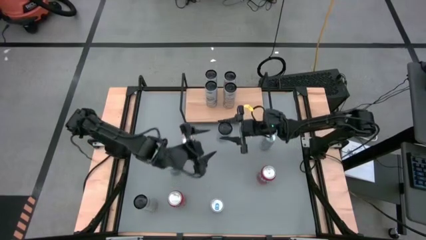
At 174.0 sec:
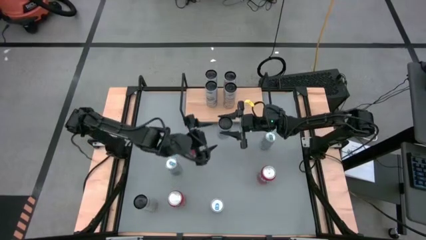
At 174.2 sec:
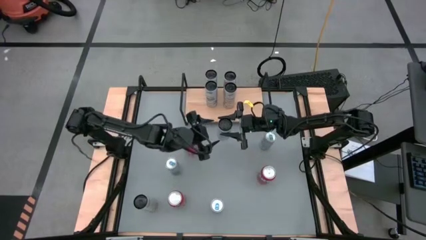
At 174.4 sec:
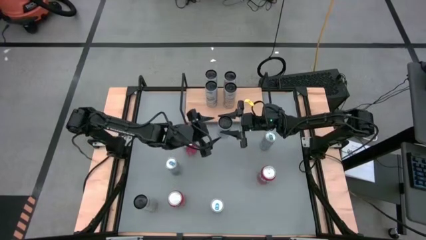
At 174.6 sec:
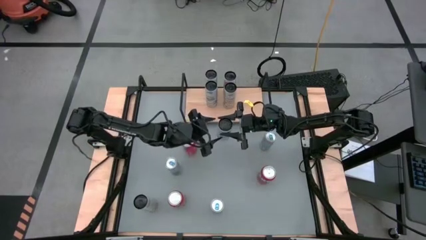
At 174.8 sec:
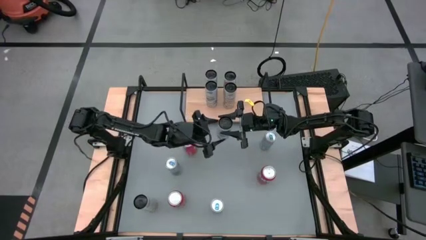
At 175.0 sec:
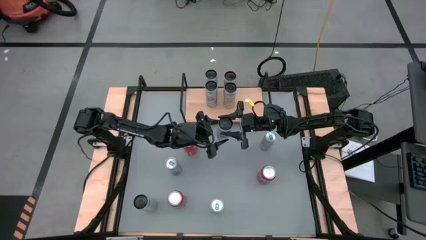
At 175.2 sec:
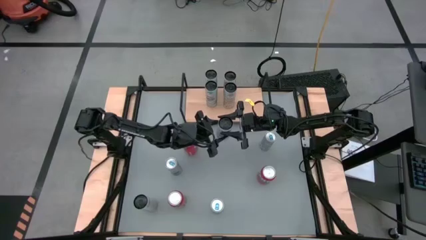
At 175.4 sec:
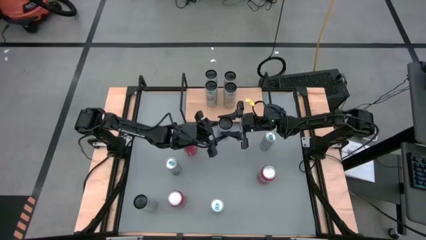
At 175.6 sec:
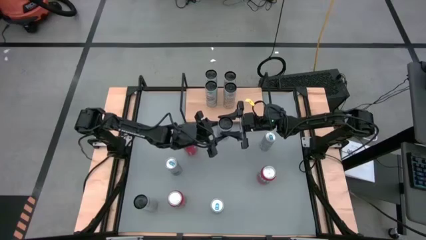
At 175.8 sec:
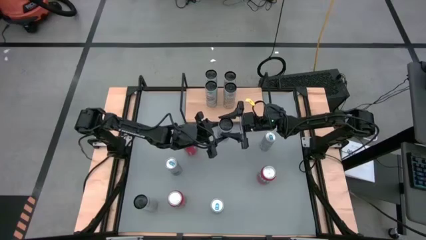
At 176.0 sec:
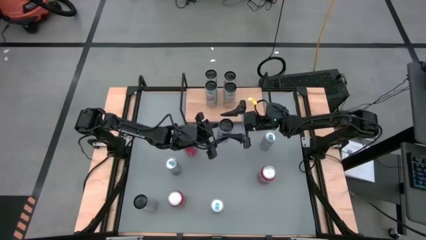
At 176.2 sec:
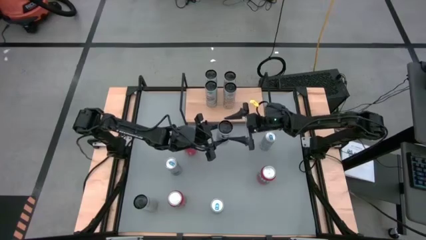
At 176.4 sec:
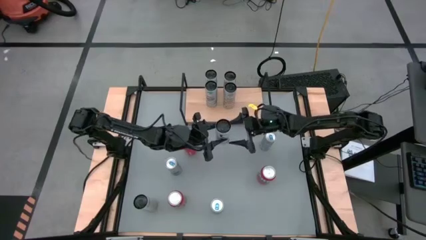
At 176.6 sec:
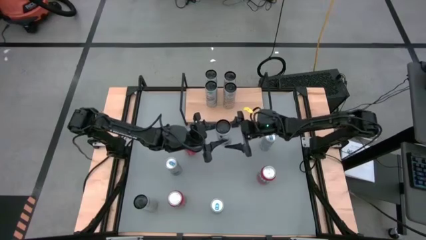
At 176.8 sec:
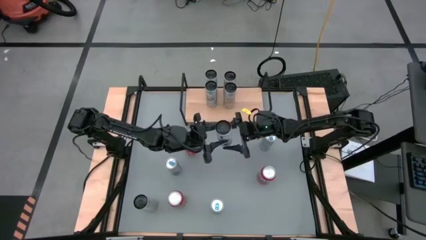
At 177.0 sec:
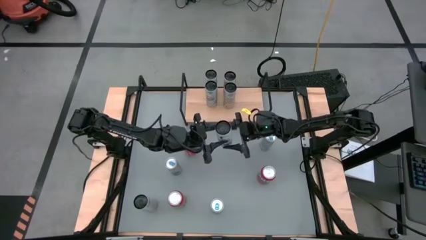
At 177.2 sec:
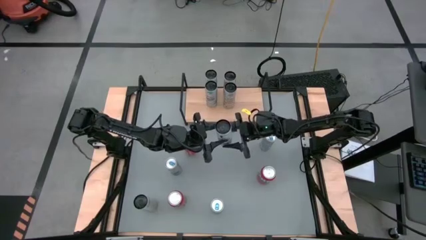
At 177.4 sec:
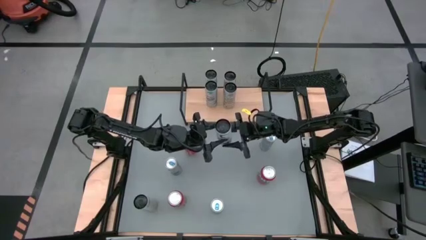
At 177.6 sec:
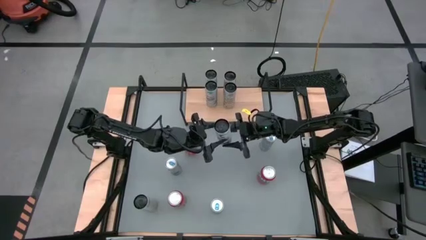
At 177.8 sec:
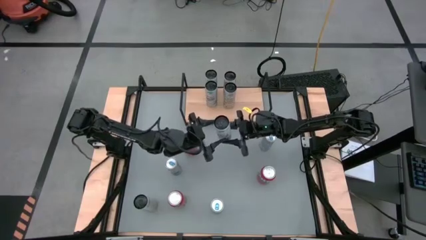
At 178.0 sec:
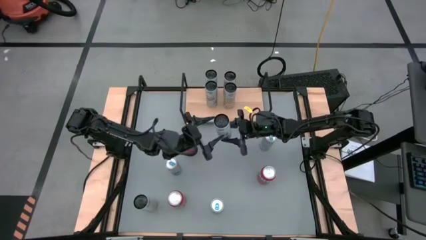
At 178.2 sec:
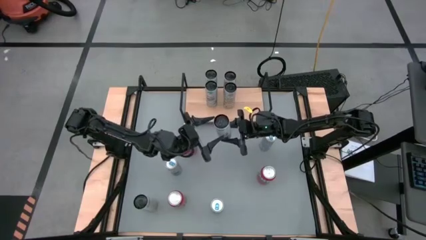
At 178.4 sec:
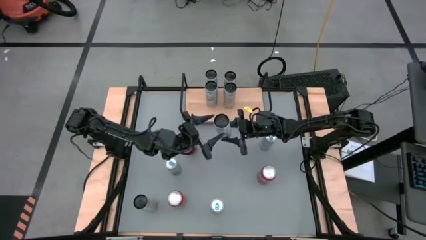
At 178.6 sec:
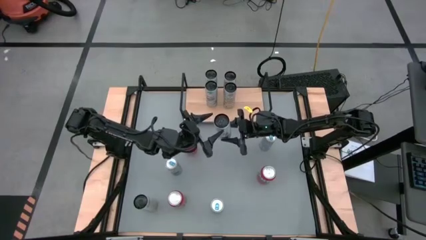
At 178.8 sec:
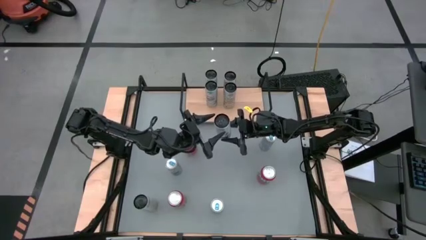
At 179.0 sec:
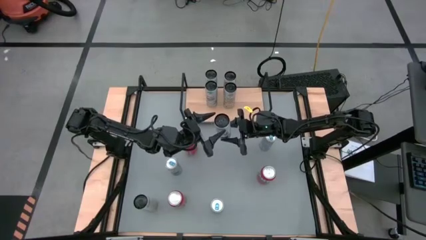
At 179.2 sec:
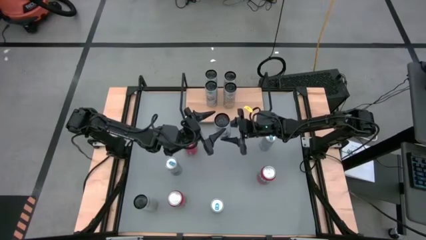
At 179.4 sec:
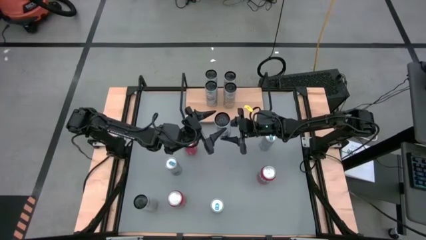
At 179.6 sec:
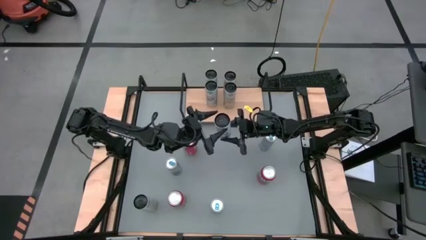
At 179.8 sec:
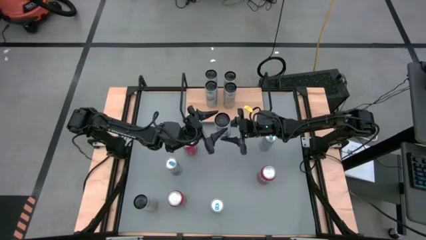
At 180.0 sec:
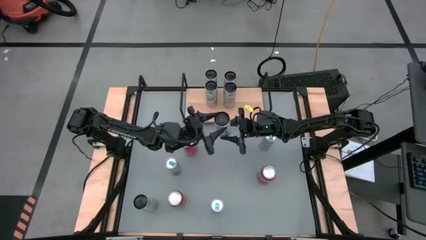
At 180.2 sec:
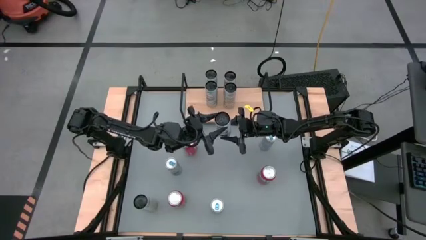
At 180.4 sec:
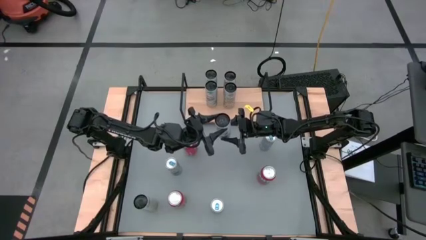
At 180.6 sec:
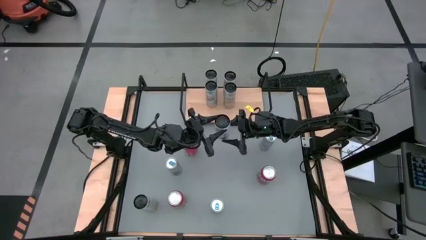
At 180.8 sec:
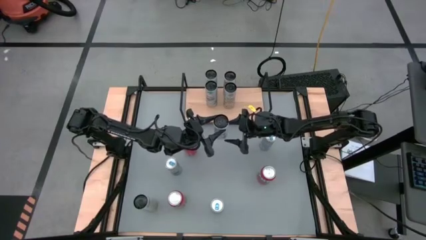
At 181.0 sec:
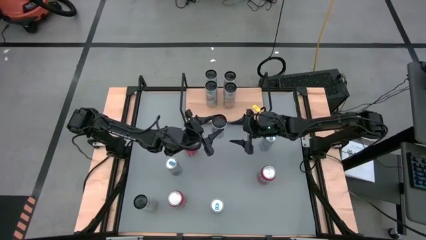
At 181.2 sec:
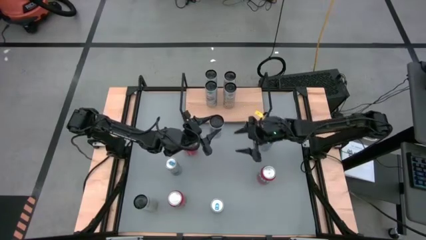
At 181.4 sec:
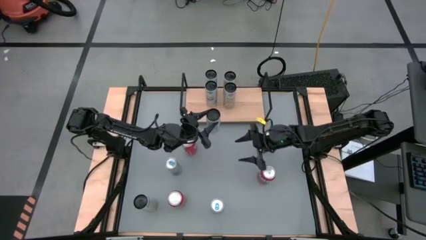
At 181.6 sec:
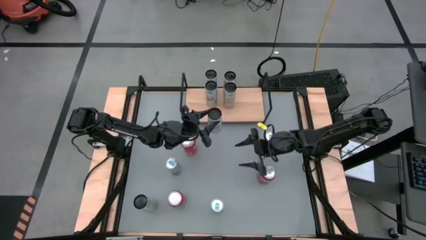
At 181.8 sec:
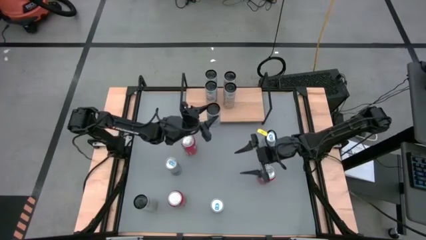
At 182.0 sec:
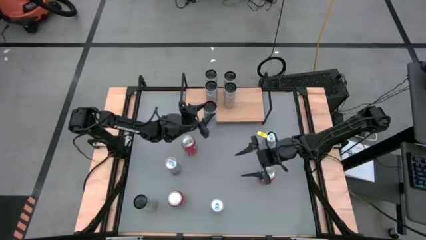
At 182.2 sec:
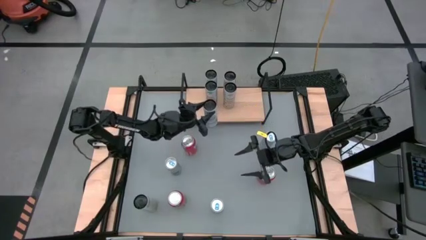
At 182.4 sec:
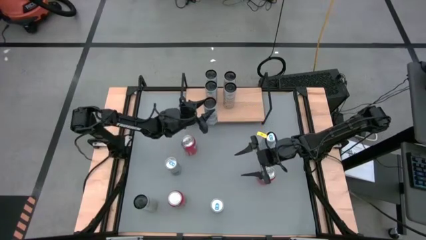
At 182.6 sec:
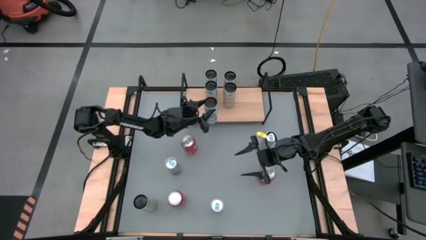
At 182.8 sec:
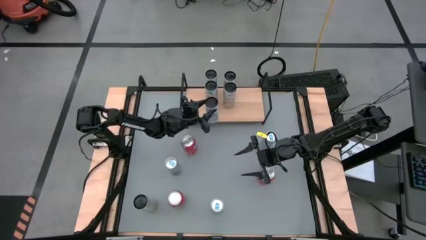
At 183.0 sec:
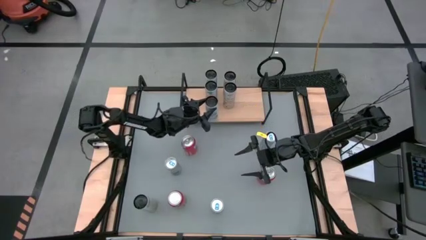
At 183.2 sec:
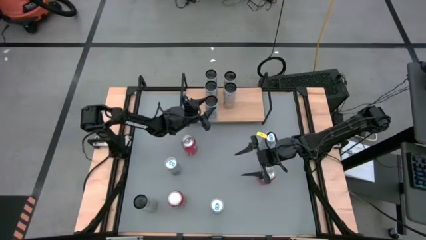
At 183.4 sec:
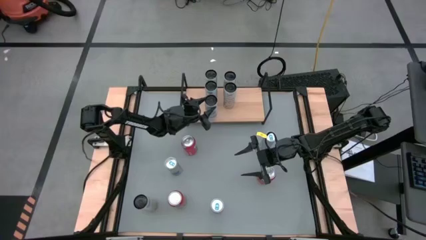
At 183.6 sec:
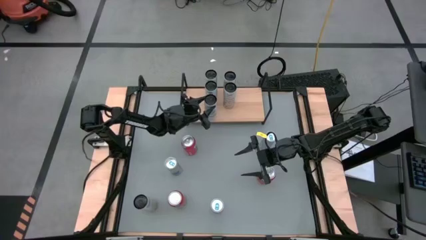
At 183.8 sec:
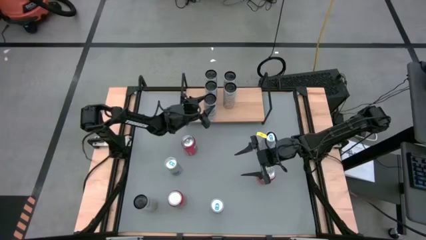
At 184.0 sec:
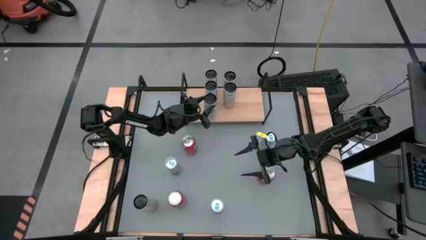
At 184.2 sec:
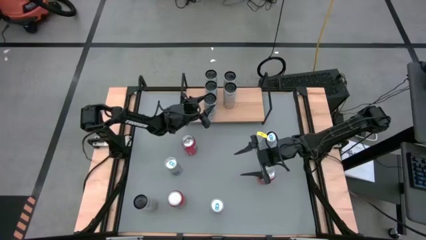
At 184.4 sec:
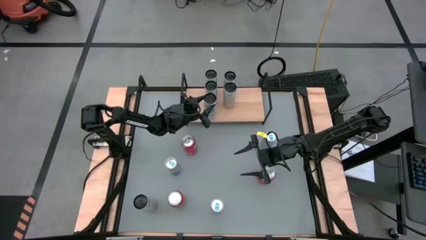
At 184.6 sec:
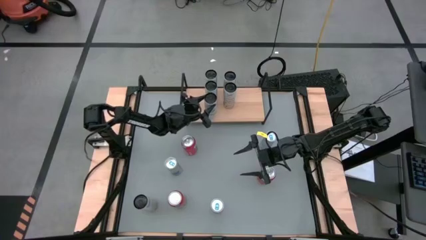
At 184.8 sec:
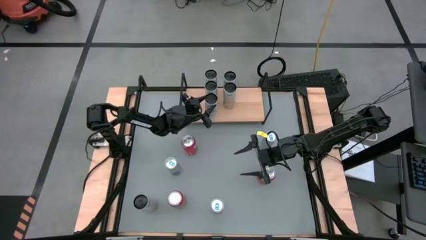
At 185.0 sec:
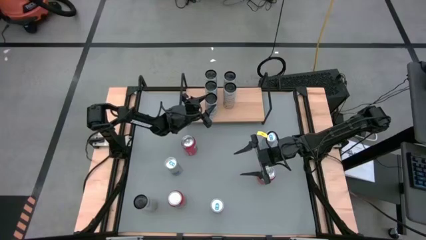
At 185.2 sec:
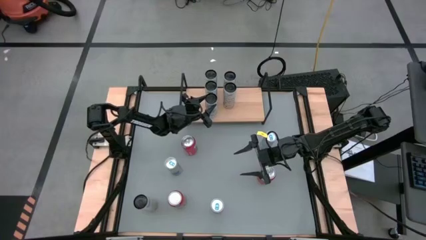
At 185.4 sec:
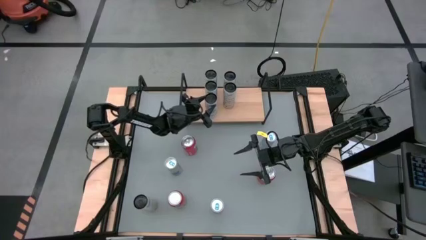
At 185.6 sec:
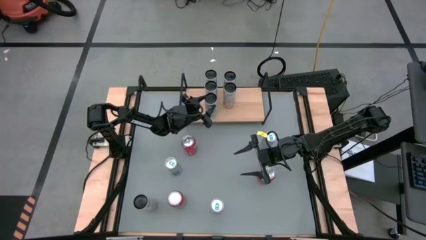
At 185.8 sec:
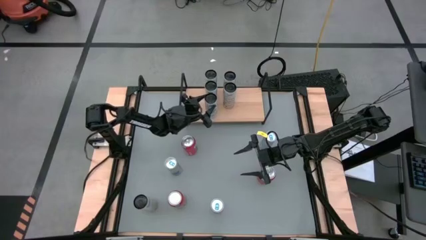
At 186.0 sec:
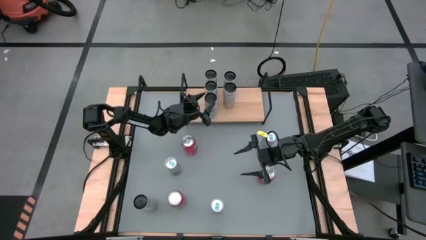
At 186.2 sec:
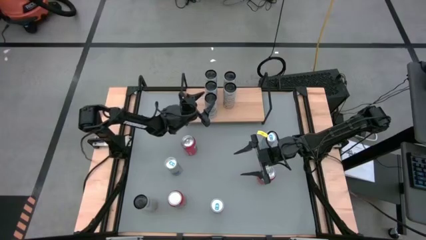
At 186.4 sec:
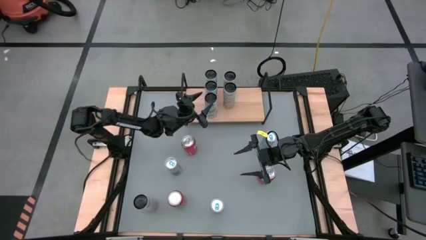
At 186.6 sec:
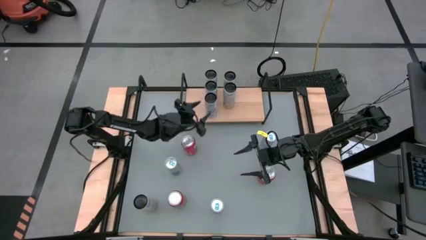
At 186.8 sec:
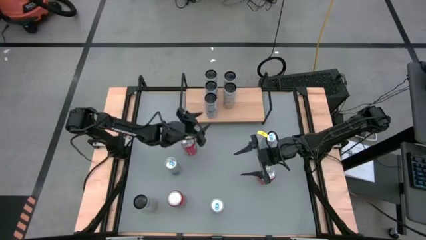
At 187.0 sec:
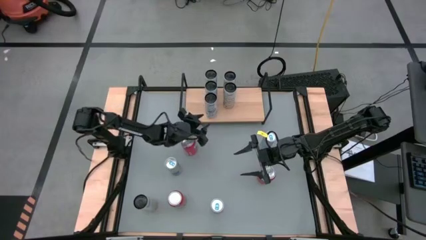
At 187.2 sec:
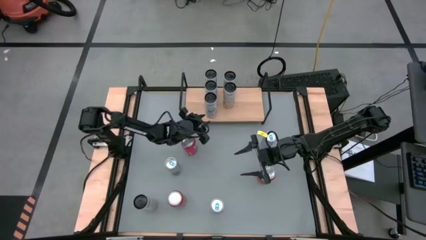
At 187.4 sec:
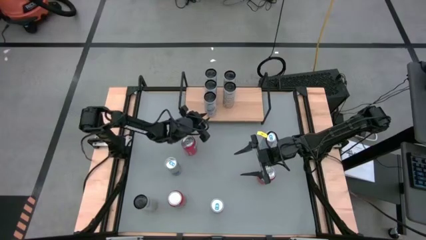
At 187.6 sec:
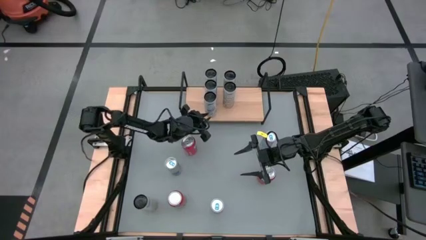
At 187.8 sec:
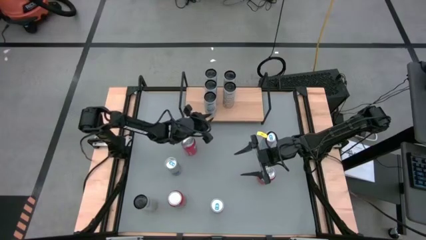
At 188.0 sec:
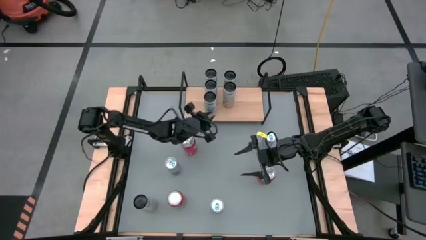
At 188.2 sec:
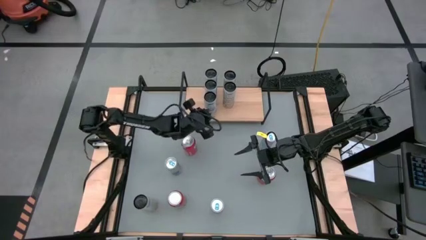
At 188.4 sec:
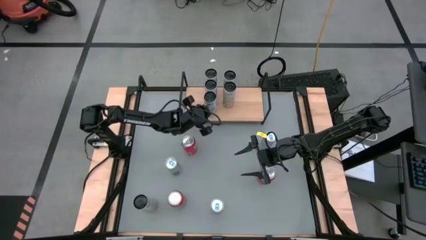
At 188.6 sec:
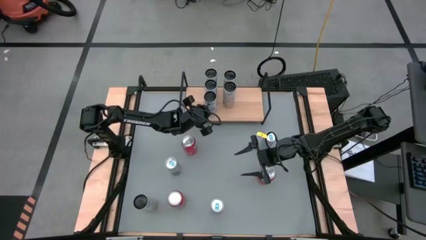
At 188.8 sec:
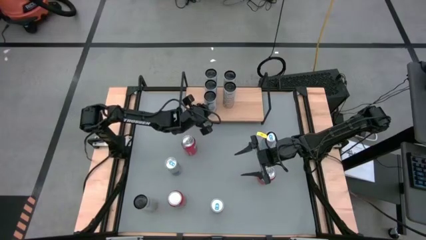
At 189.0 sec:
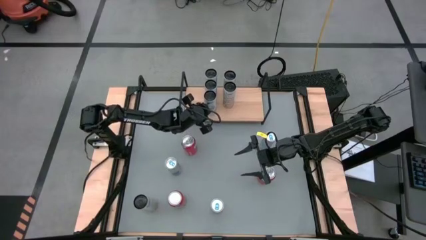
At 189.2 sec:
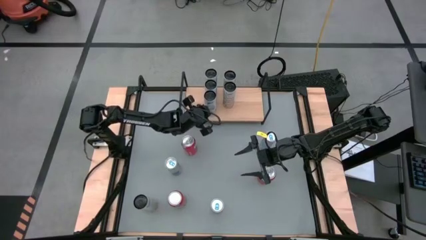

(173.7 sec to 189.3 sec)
Task: Place canned beverage on shelf
Put the white blue soda can aligned with the other white blue soda cans on the shelf
